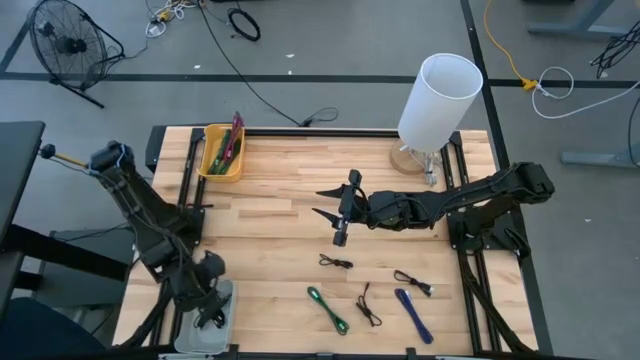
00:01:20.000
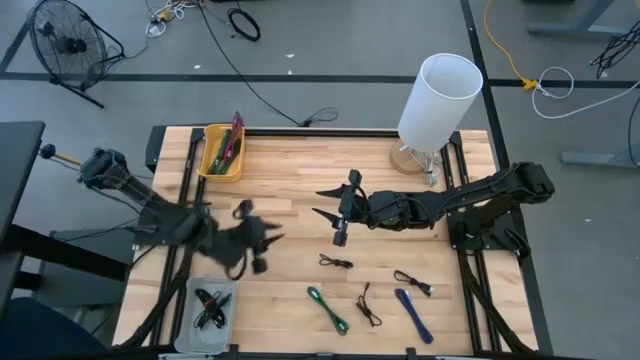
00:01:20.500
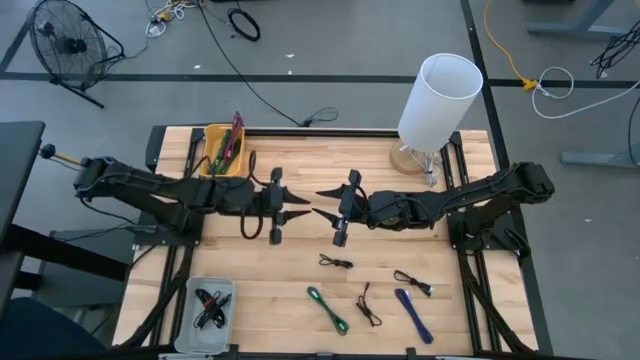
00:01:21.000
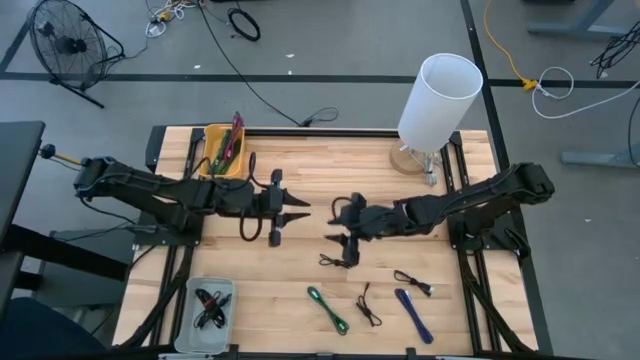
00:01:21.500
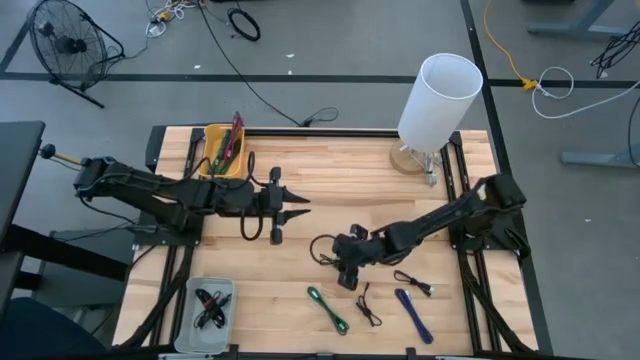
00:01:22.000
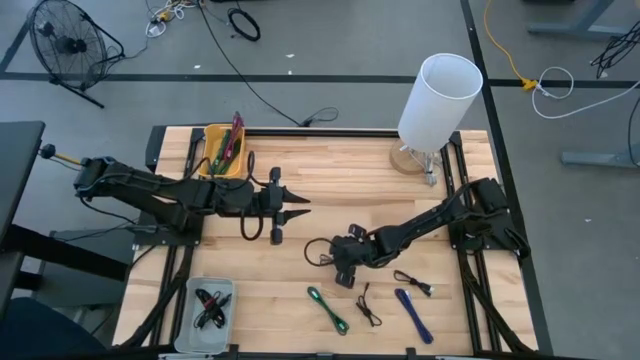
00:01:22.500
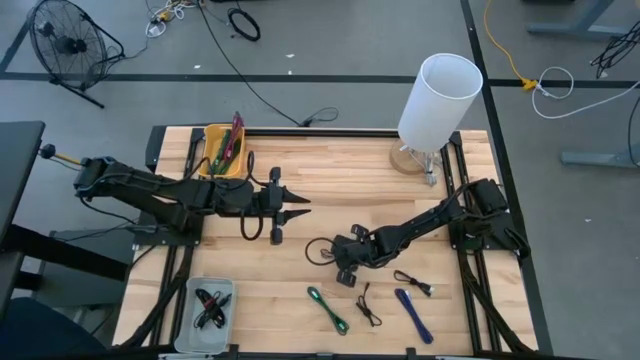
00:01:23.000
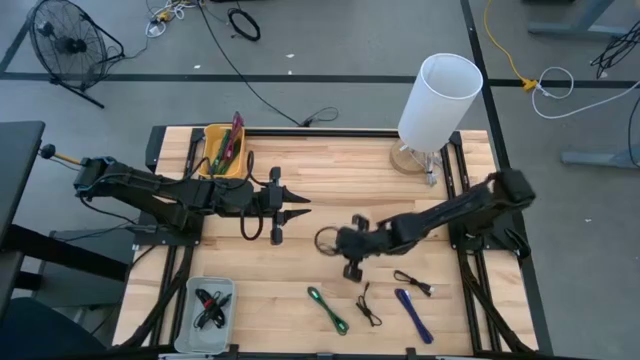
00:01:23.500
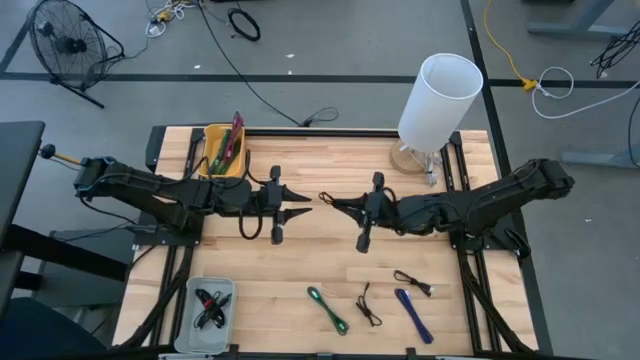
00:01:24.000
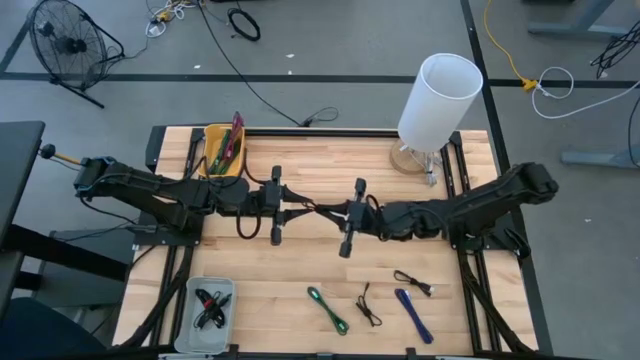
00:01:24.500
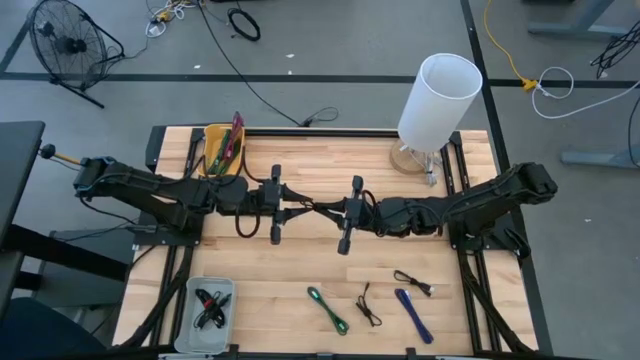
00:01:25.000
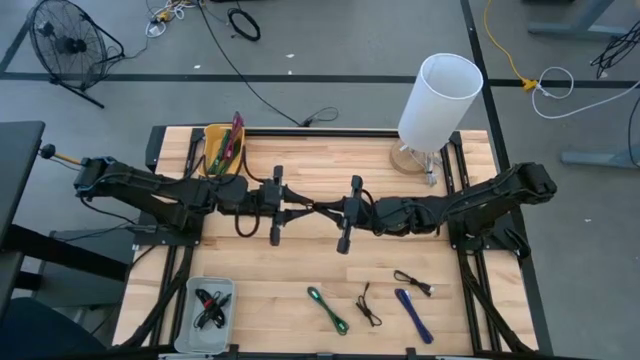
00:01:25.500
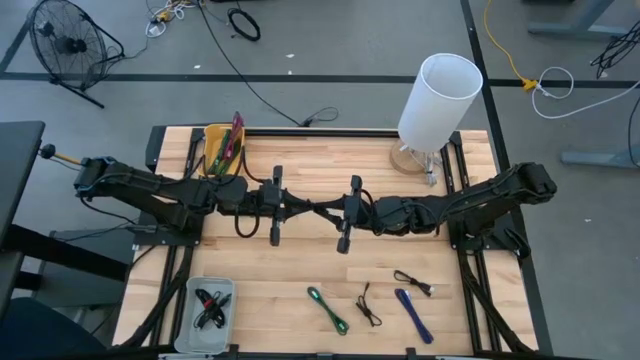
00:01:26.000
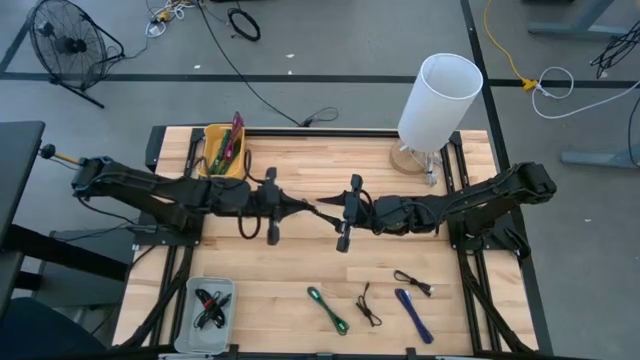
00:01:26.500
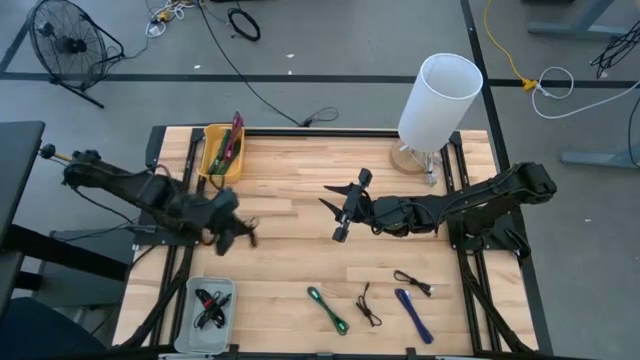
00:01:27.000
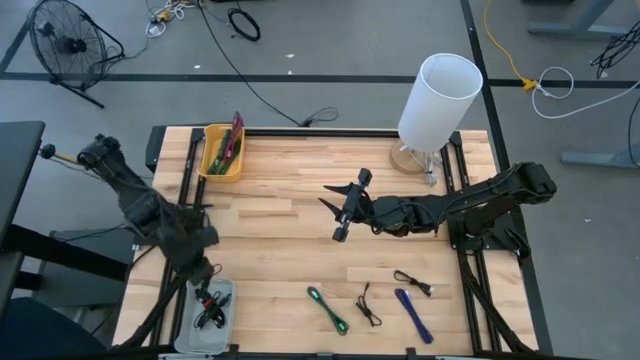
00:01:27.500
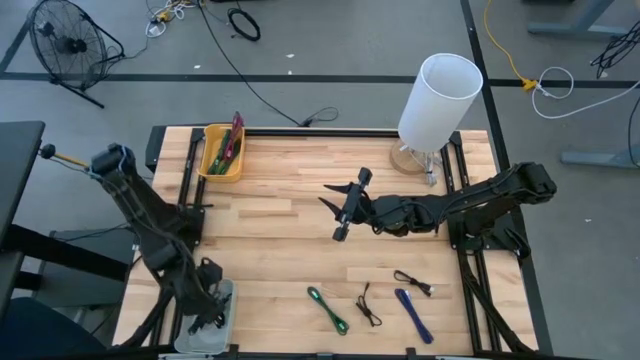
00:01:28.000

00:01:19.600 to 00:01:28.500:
Task: Pick & Place USB Port
Put the black charger cable into the gray bin

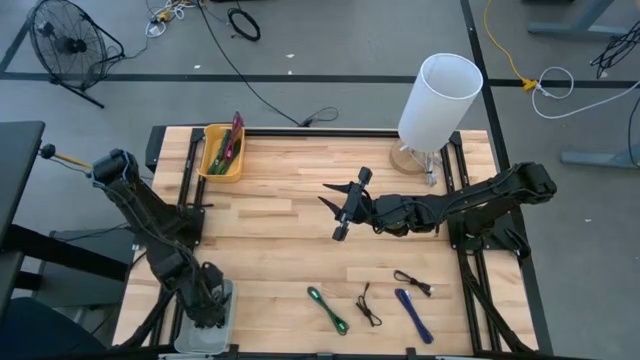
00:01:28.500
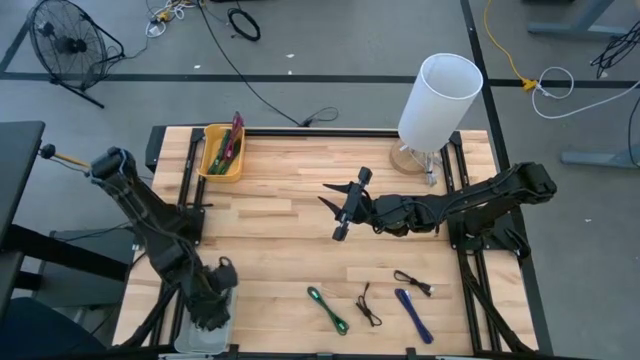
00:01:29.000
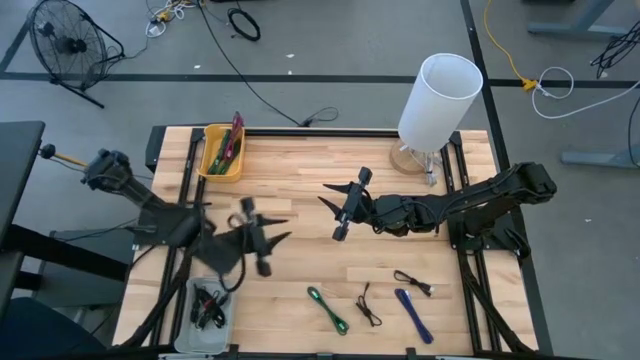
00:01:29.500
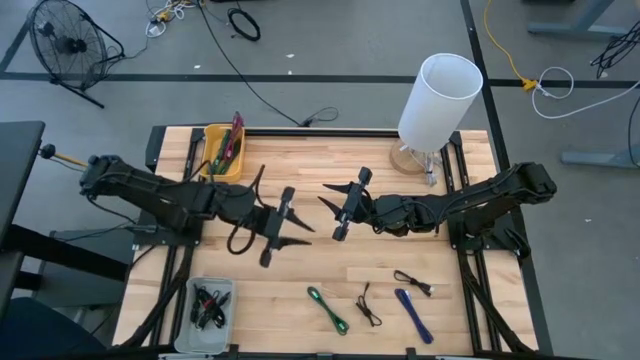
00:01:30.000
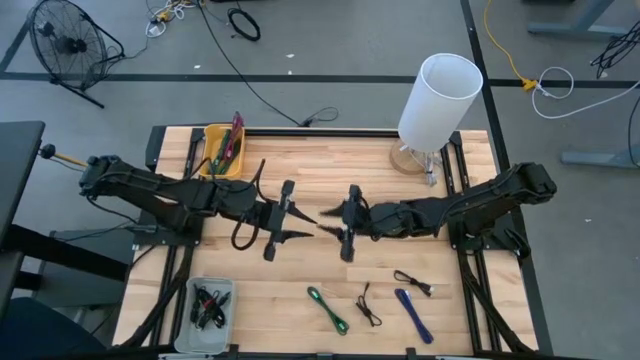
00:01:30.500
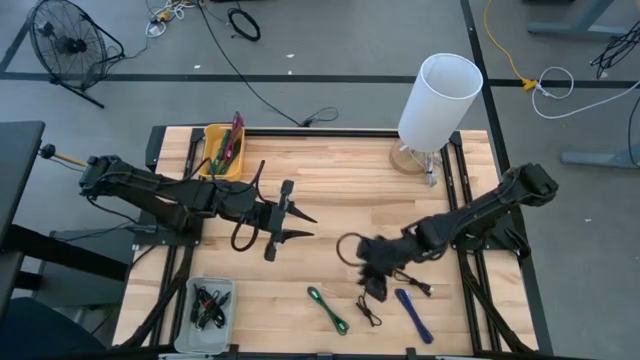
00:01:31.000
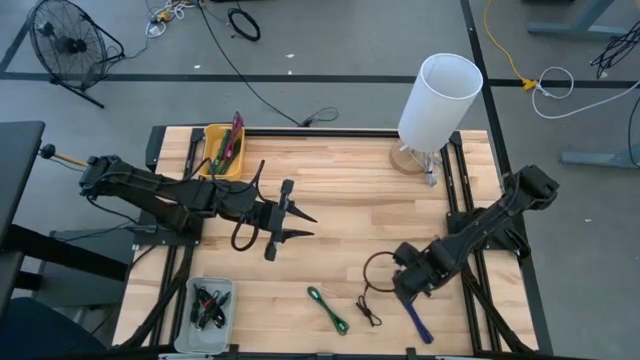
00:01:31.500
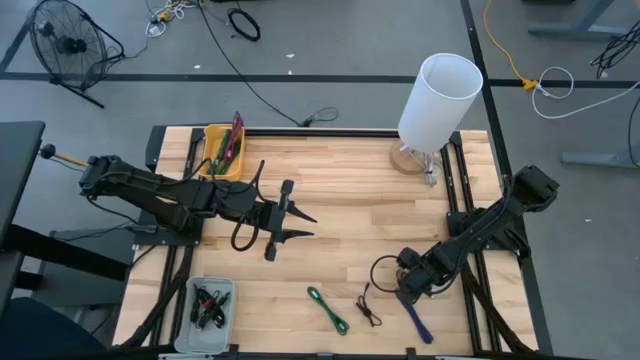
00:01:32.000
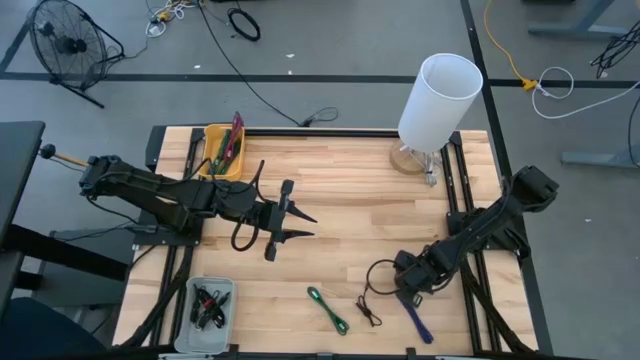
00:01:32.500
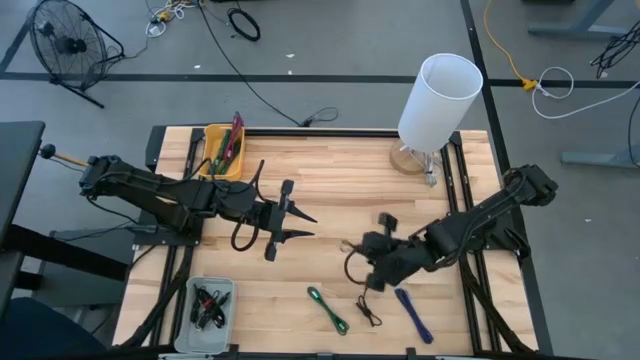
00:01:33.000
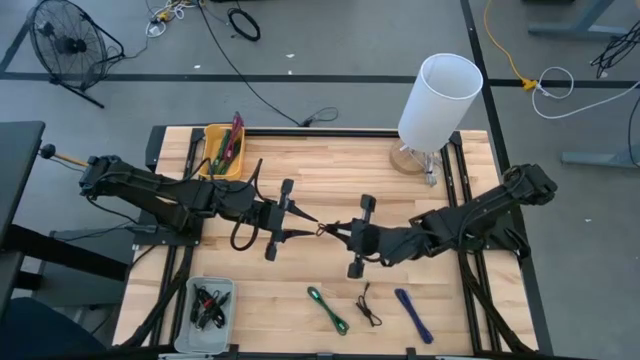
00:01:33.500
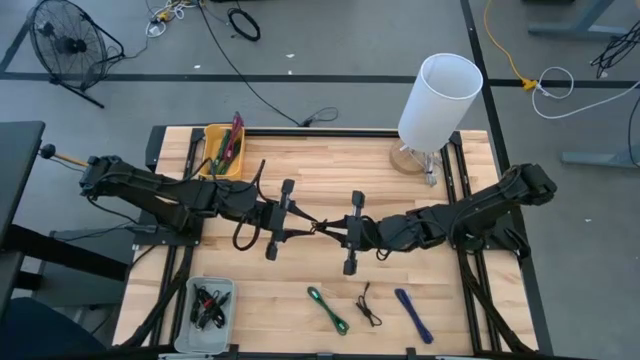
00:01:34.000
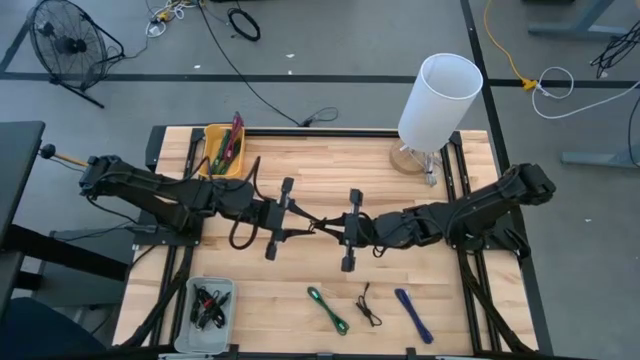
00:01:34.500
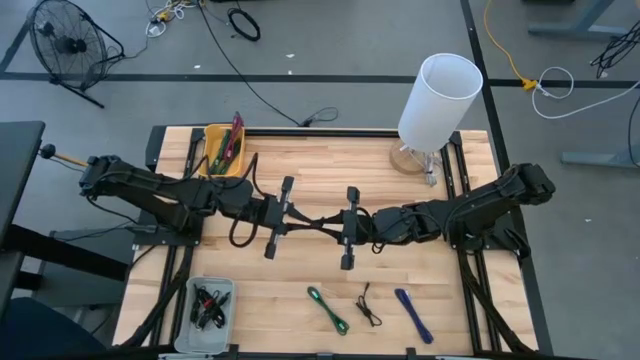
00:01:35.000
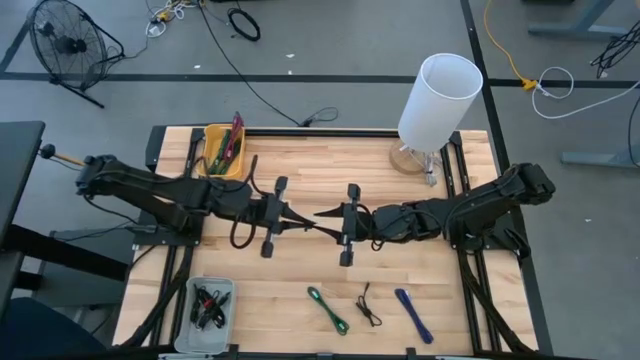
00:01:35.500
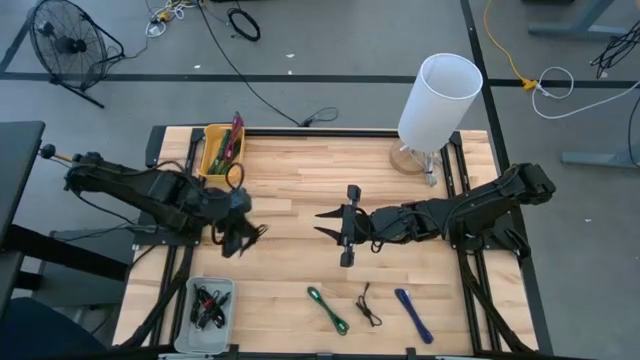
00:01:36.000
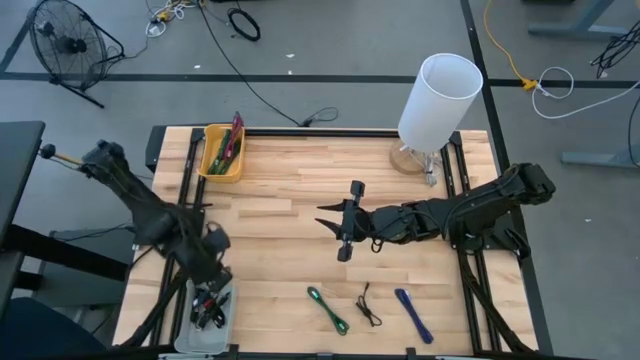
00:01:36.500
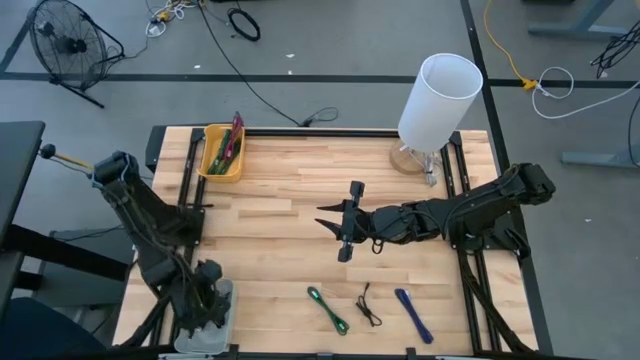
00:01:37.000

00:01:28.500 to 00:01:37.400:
Put the black charger cable into the gray bin

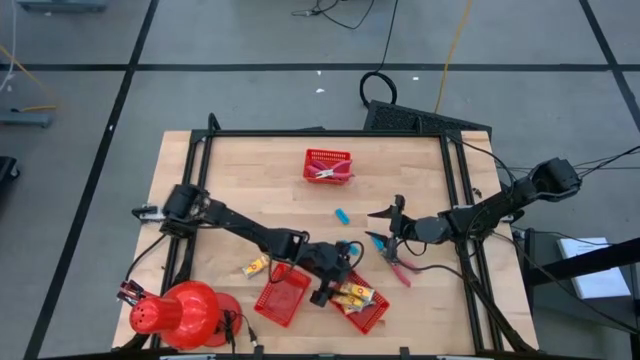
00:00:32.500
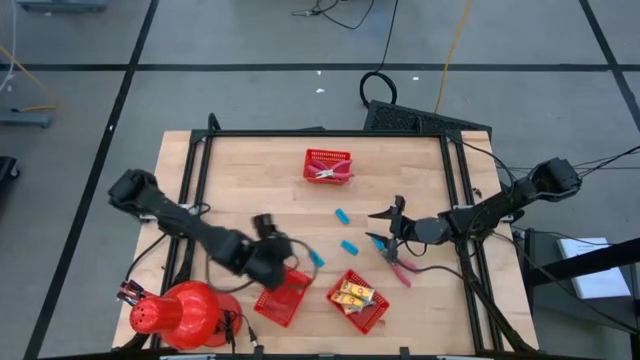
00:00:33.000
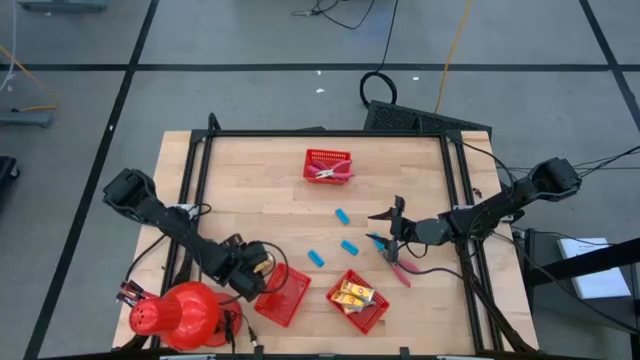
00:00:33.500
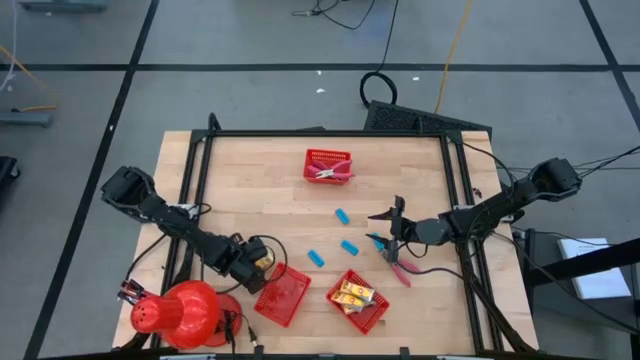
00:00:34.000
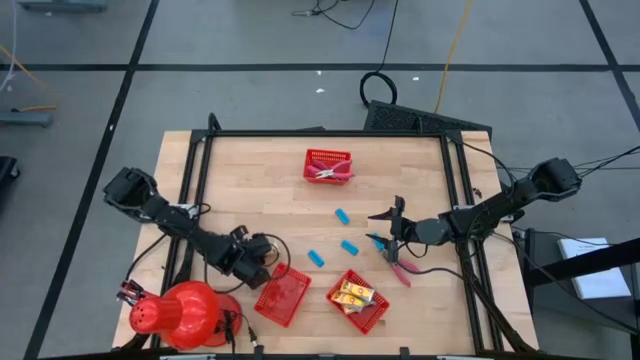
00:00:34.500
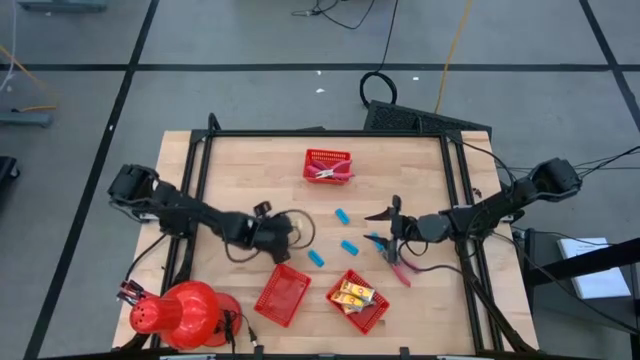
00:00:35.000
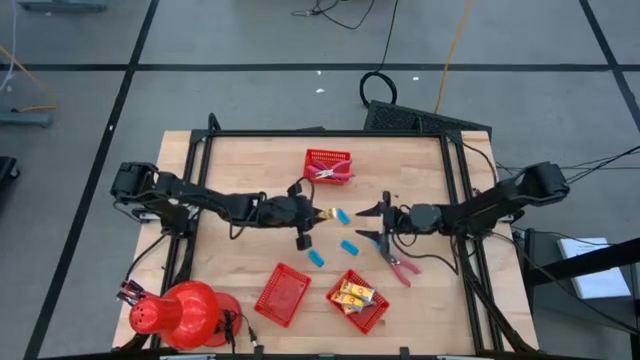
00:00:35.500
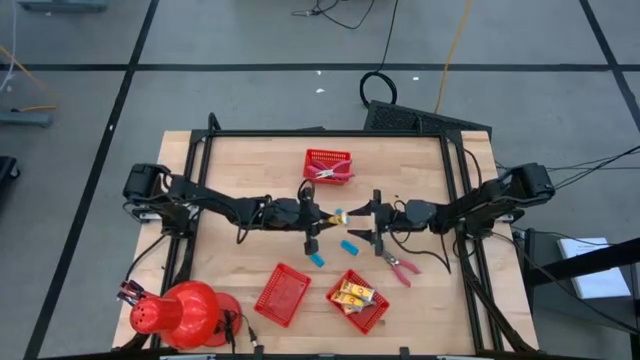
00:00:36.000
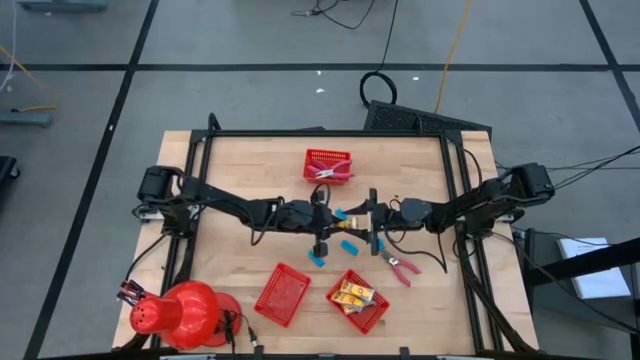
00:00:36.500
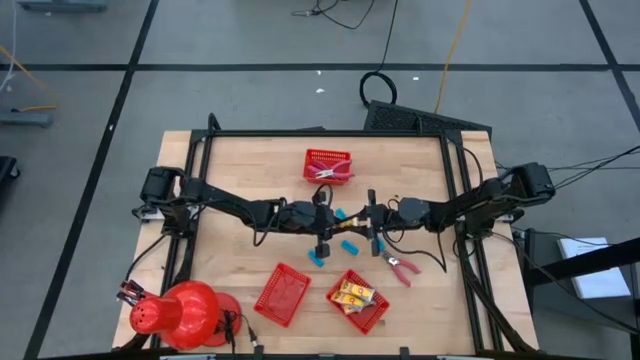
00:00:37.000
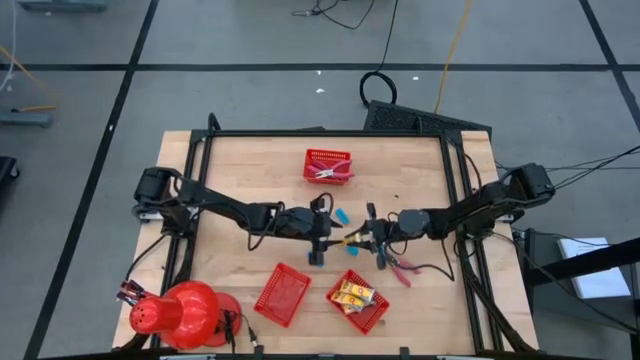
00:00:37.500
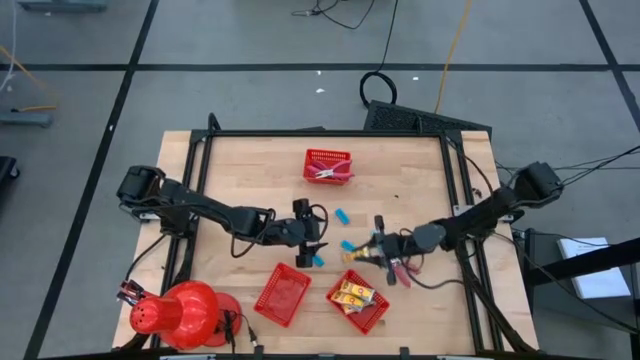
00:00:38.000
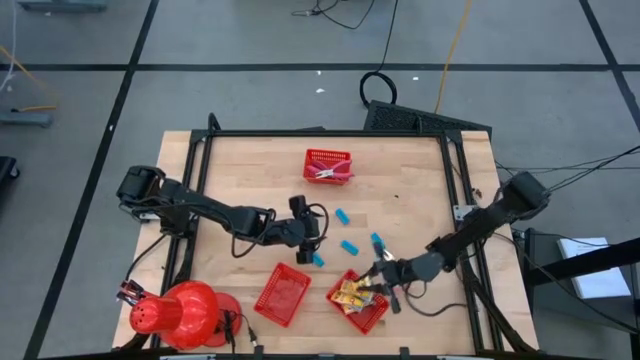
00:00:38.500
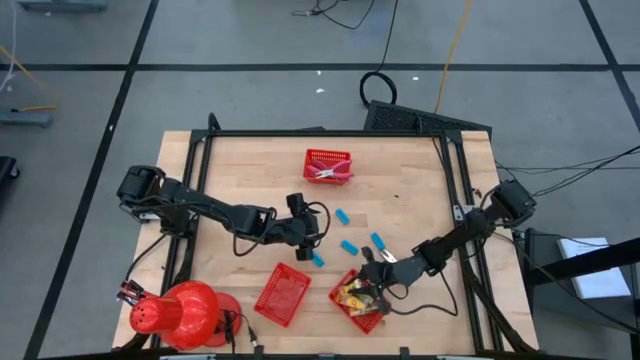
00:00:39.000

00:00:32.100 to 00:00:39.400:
Task: Pick & Place School Supplies
Put the yellow crayon pack into the bottom right red basket
